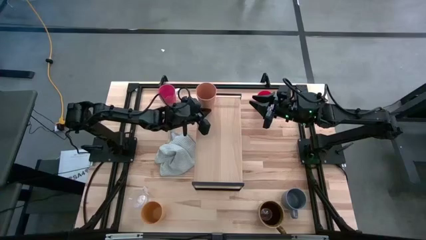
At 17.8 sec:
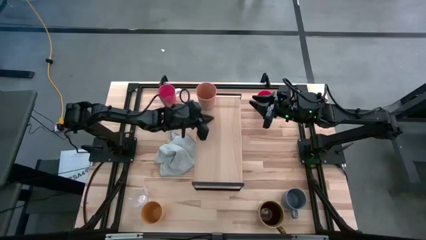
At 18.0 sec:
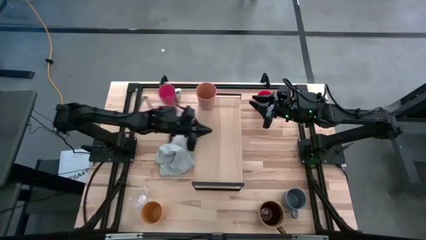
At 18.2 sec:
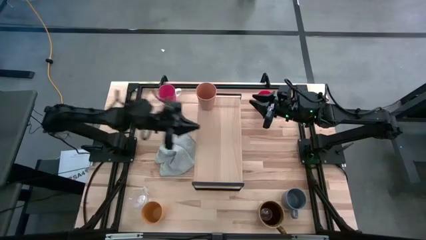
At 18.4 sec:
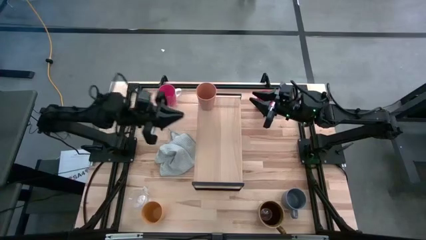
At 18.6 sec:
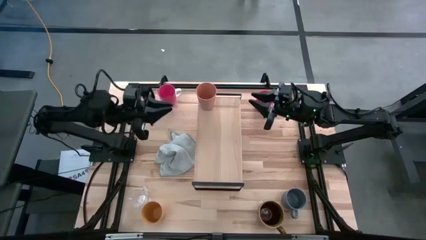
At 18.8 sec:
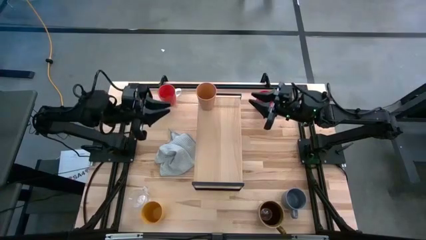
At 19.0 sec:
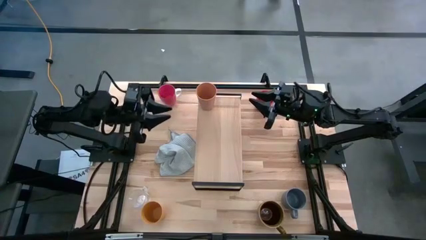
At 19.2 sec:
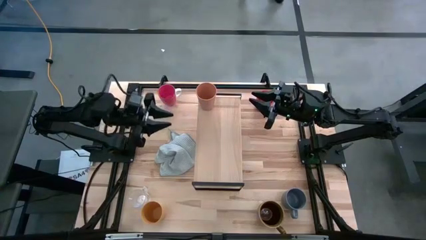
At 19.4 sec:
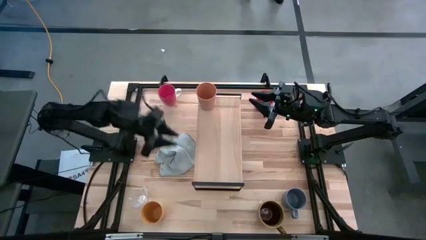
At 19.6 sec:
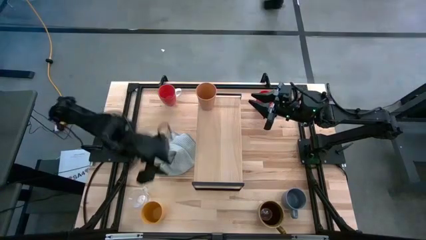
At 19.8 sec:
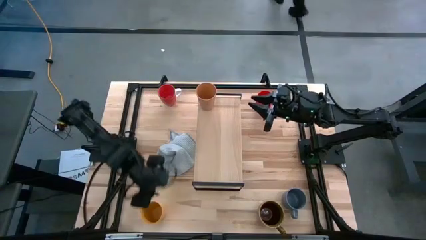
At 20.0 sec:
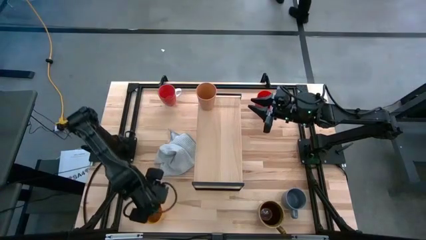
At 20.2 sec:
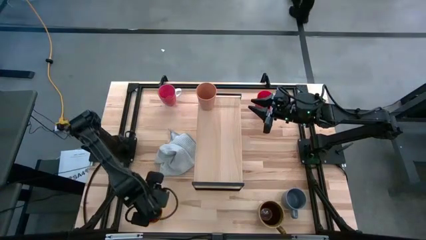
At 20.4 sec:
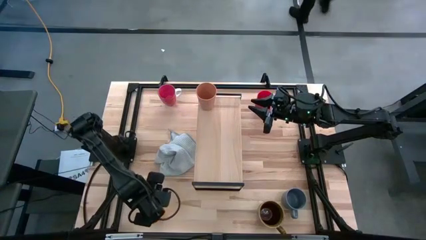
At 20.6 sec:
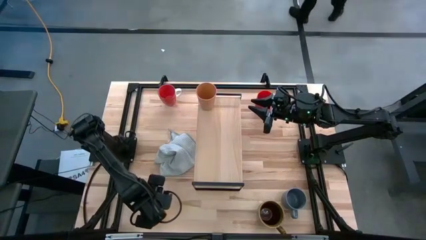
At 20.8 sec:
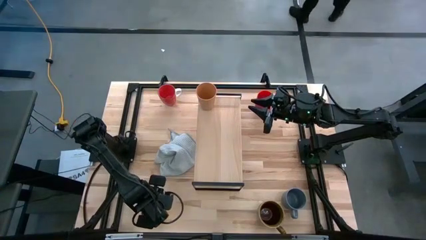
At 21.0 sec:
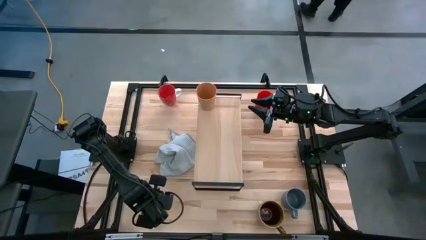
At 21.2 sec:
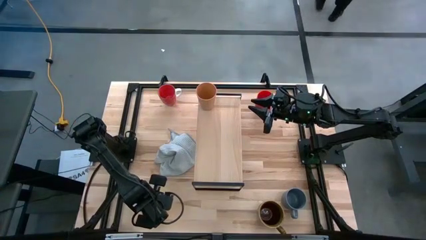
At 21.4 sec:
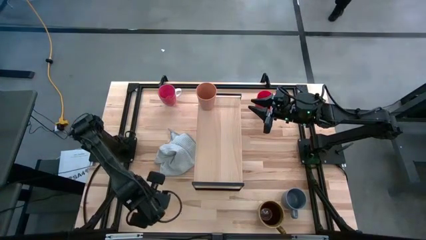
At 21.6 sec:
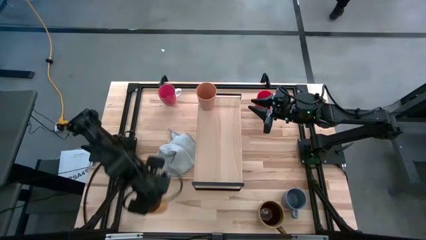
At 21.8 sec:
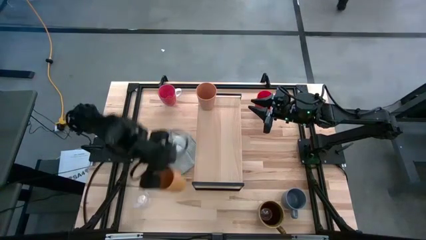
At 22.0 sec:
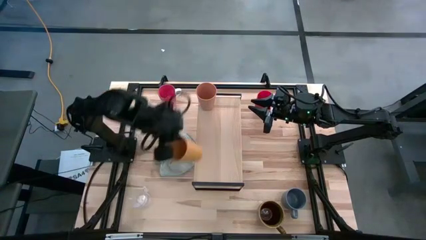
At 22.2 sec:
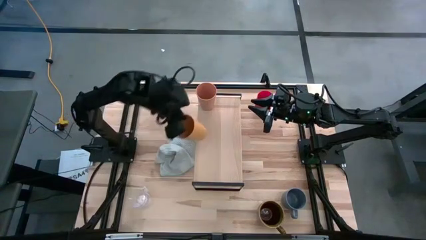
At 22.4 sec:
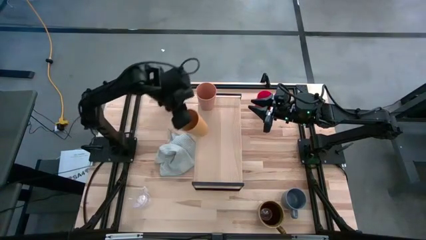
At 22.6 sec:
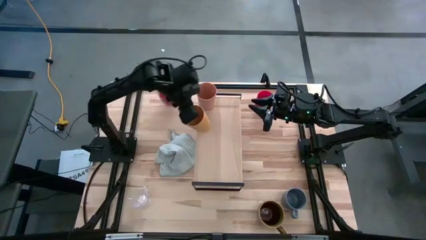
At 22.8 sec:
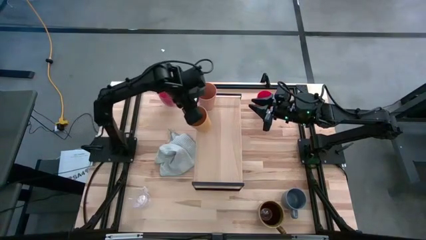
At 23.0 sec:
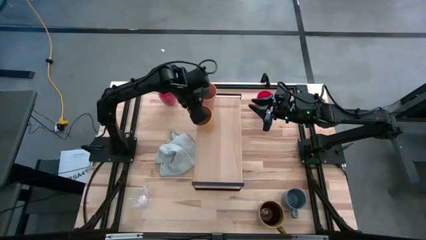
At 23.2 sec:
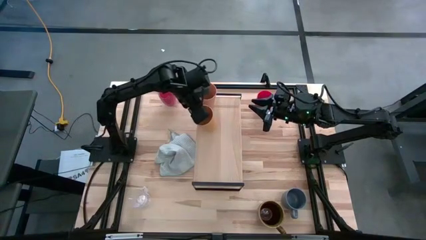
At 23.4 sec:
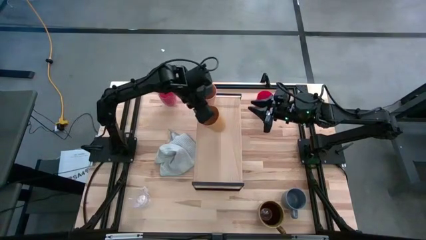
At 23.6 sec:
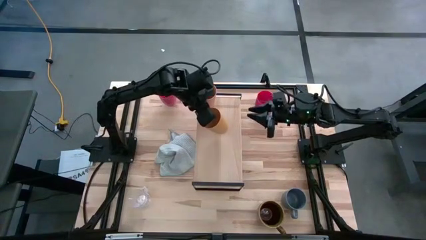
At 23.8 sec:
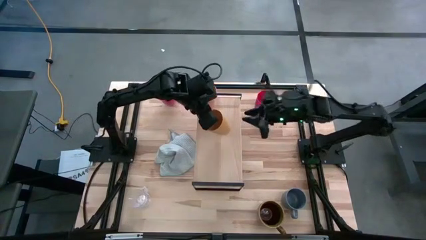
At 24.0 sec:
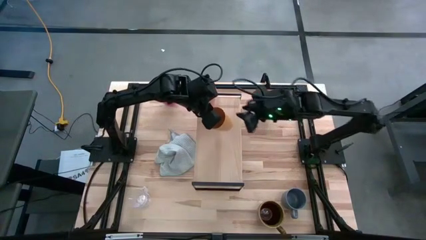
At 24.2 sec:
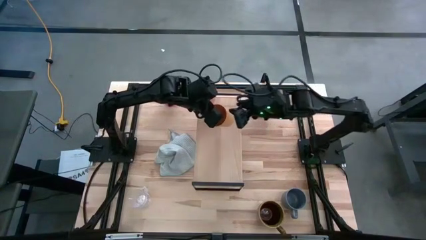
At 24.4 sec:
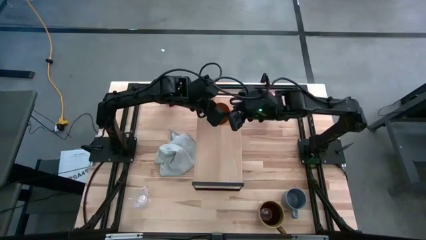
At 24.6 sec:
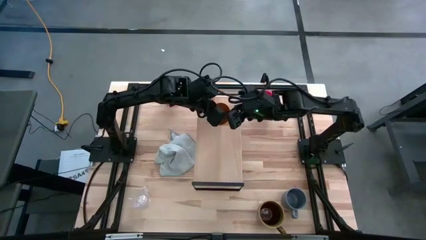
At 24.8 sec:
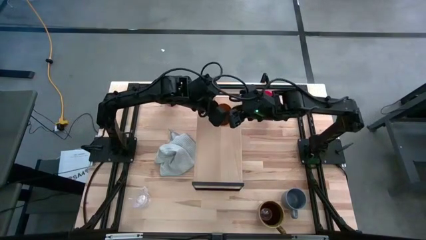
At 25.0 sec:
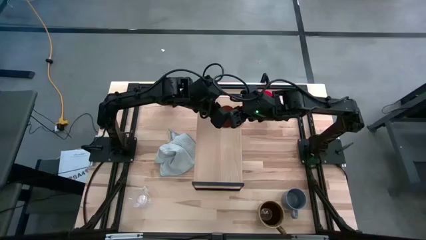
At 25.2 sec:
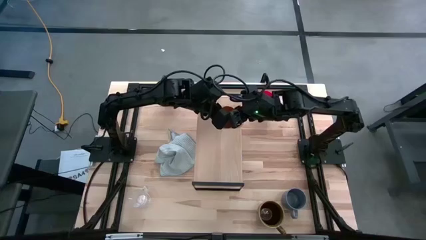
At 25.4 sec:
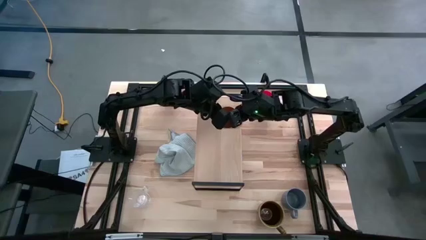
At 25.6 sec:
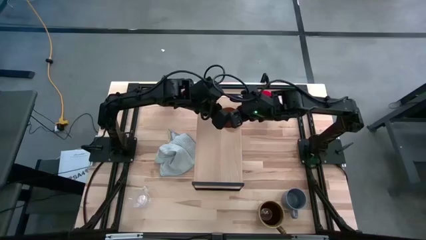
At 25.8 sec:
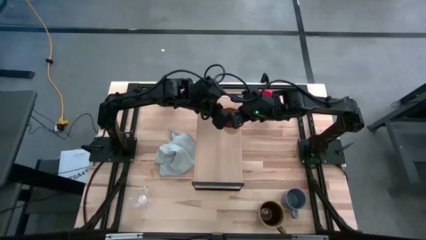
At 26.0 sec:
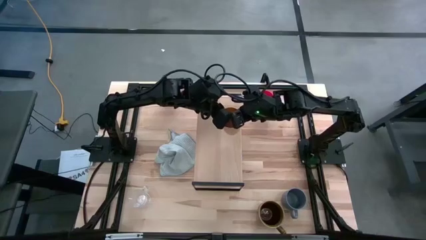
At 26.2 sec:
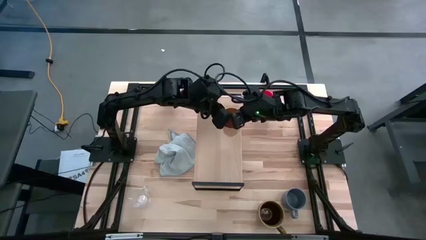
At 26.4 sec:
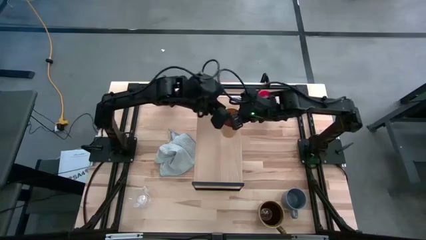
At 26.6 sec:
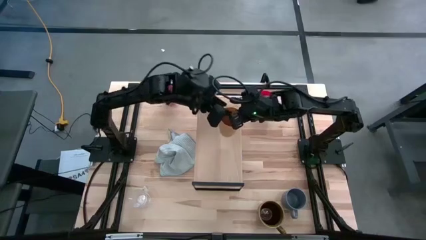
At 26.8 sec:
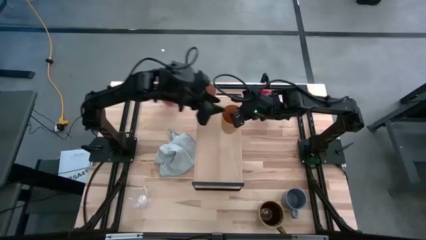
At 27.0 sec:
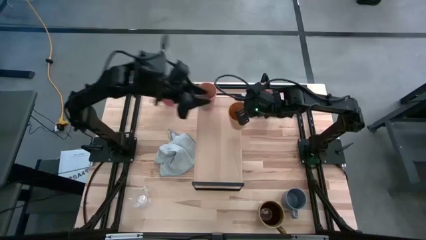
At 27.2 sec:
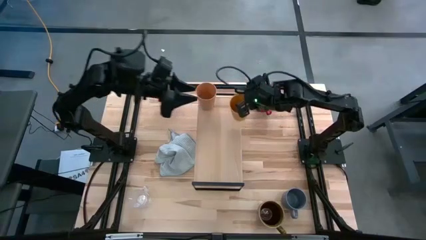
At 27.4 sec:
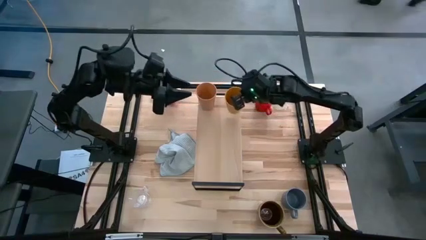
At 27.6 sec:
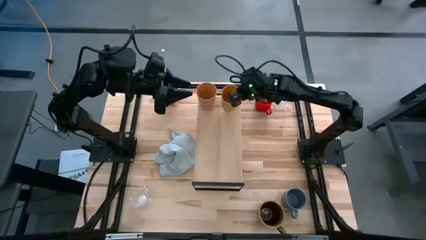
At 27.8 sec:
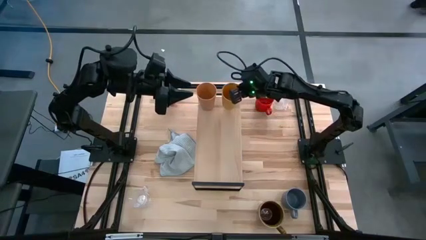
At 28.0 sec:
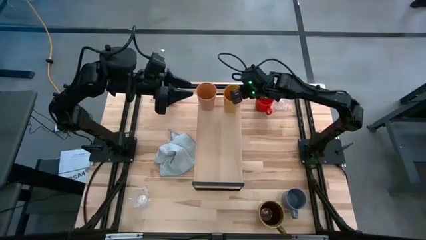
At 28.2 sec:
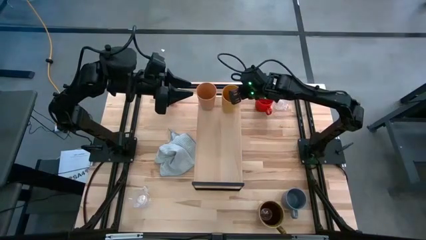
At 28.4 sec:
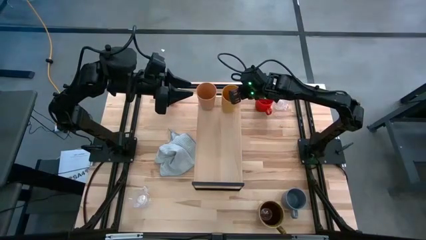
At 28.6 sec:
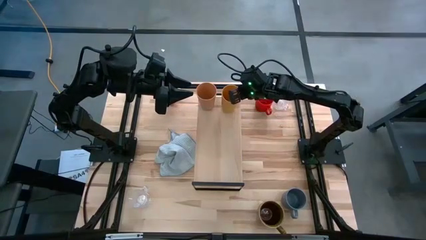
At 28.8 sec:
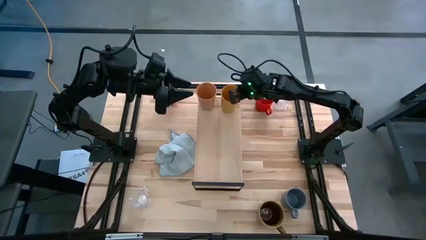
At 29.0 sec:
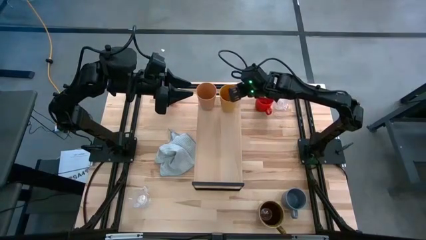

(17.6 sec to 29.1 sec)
Task: Stack small to large cups/mugs on shelf
Put the yellow cup on the shelf

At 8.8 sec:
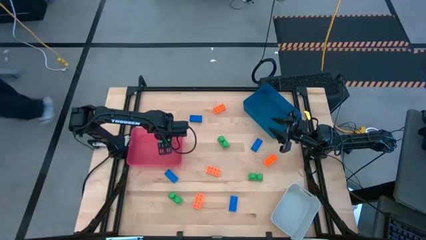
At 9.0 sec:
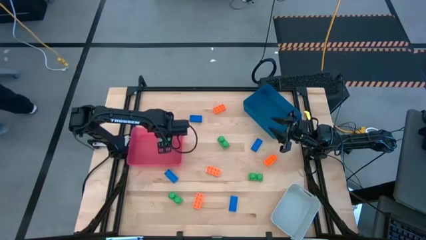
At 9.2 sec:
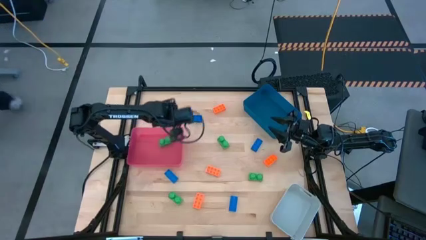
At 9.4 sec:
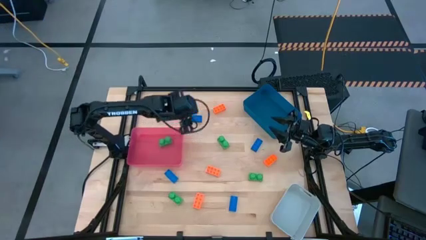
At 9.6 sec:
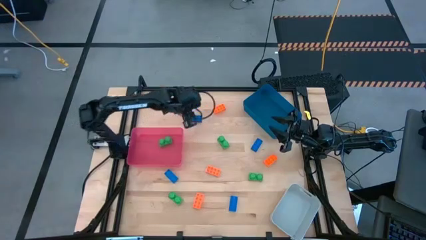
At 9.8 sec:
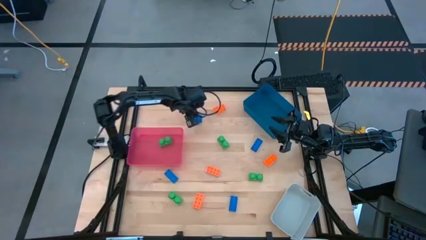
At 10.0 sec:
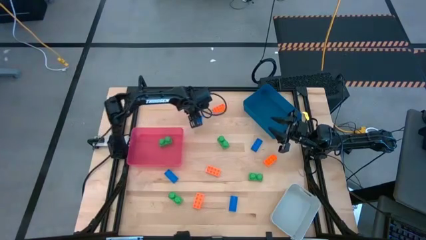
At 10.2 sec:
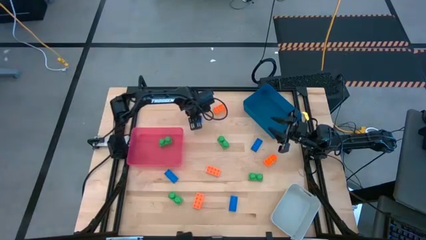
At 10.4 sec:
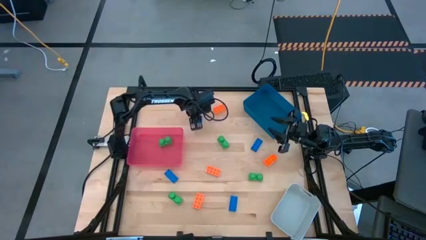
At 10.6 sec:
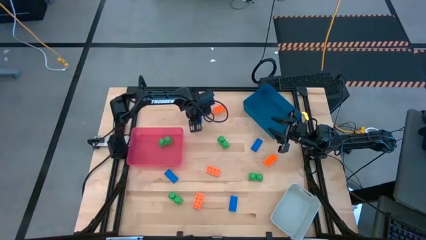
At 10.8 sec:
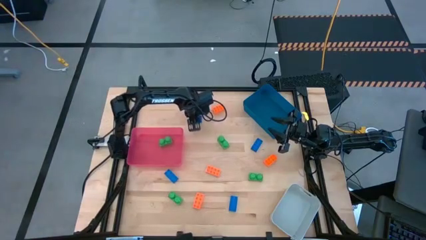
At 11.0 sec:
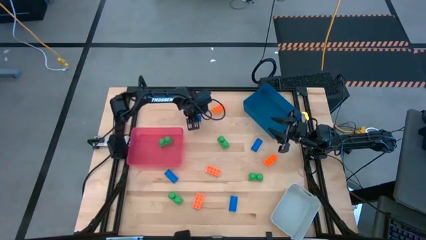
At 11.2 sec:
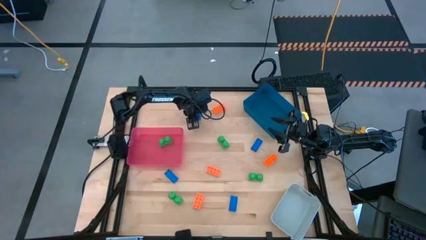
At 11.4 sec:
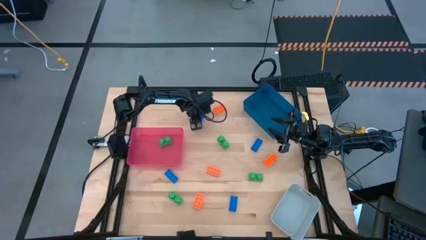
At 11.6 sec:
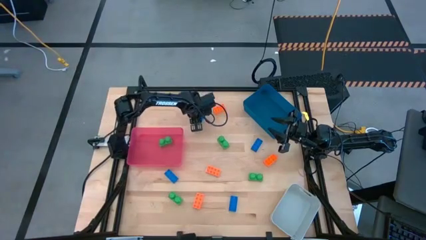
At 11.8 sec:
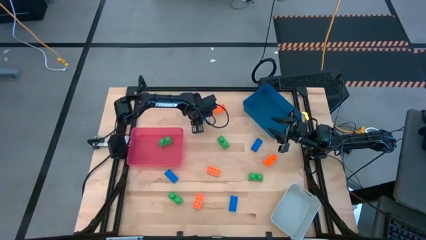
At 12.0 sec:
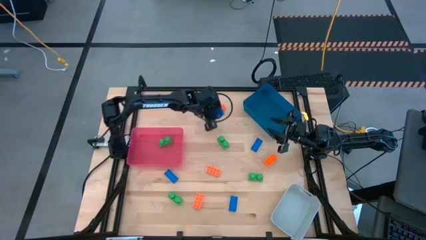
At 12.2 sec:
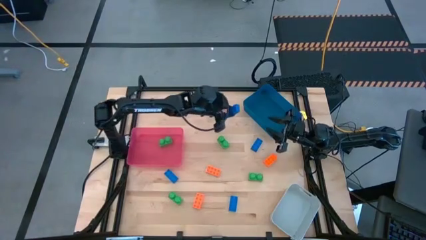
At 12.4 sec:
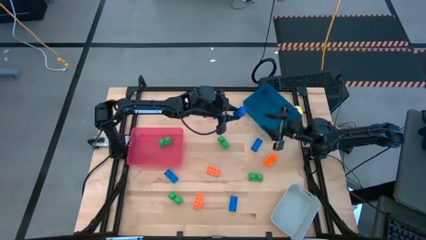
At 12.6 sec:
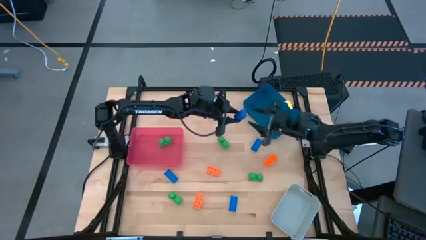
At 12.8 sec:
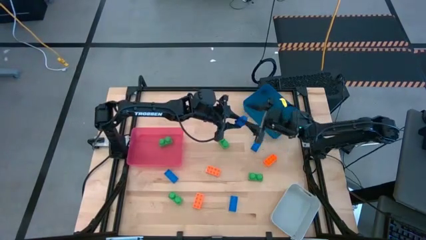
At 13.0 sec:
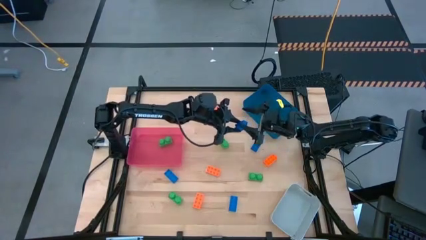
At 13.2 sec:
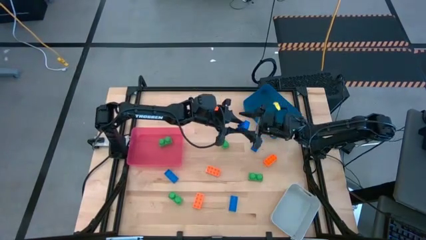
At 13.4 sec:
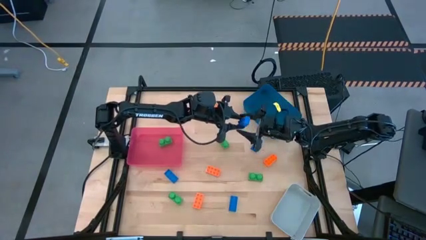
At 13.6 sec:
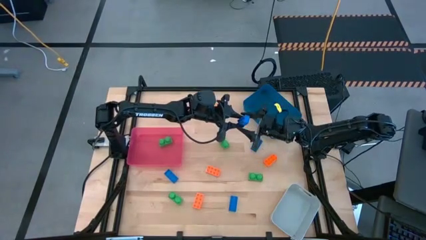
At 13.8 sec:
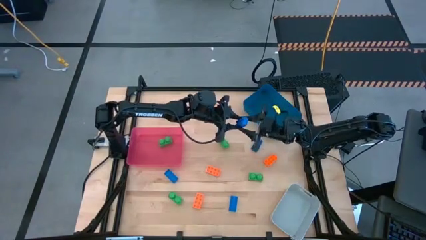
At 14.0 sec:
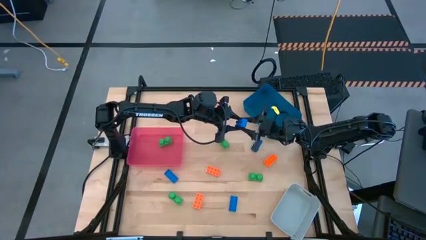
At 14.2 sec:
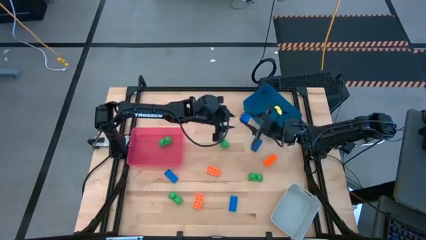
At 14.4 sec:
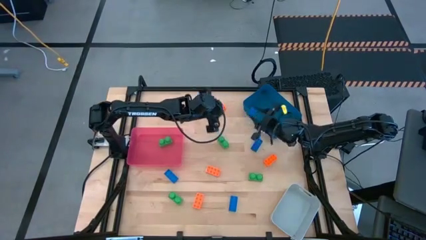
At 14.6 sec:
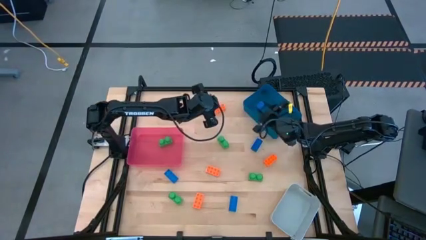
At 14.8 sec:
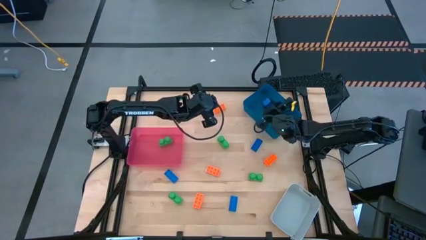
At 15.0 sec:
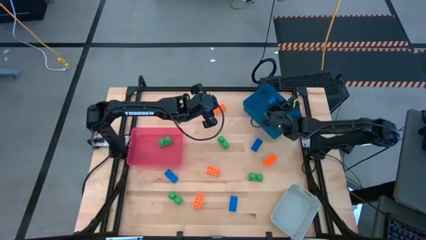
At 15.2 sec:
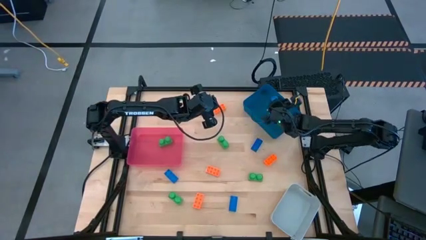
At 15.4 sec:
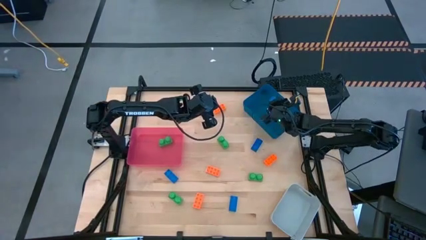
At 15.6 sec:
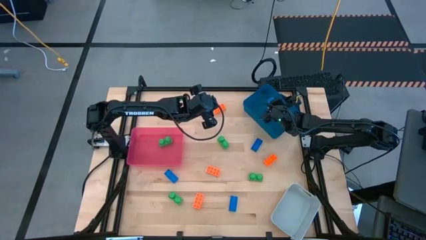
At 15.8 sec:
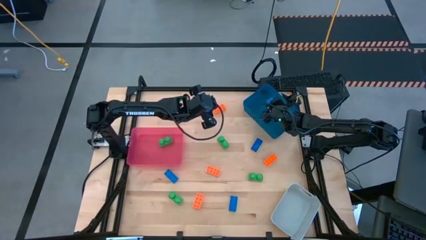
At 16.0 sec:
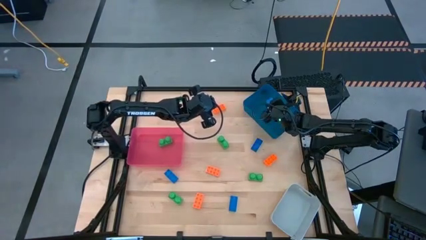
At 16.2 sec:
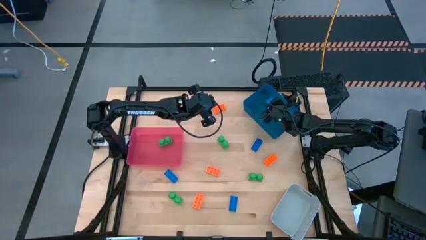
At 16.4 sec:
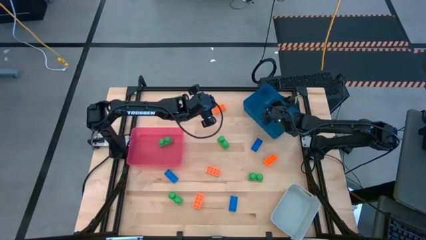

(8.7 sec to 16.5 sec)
Task: Sort & place blocks by color
Put the blue game piece into the blue bin
